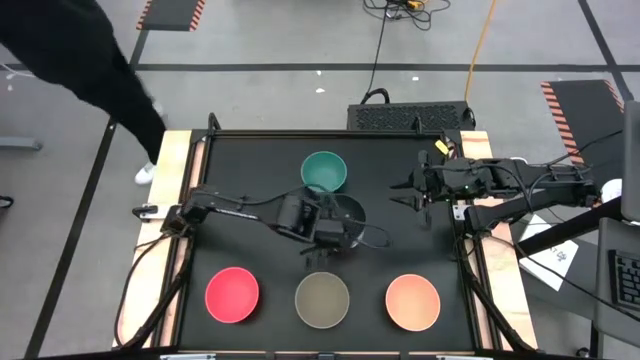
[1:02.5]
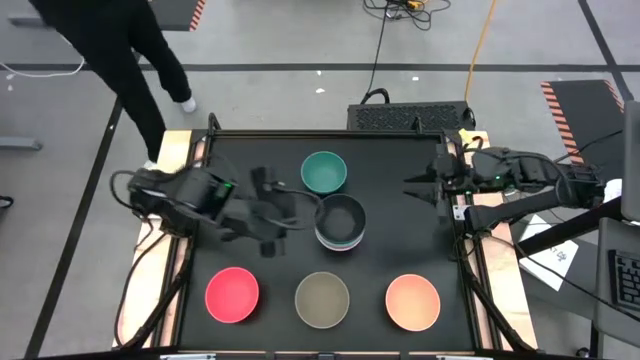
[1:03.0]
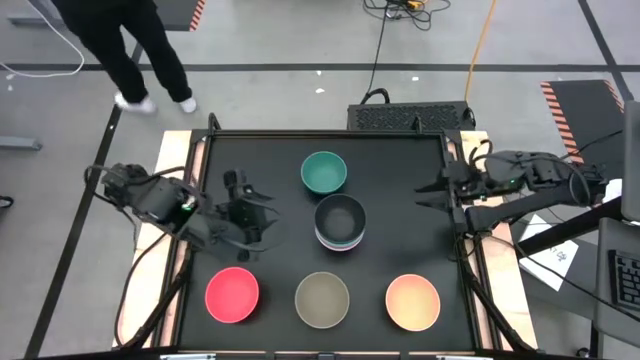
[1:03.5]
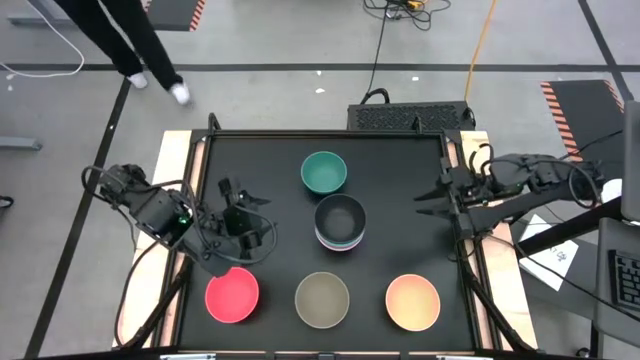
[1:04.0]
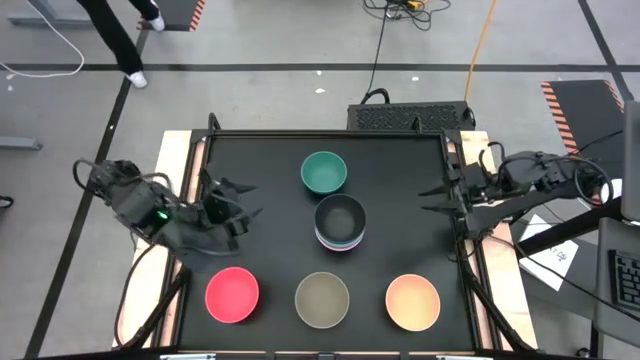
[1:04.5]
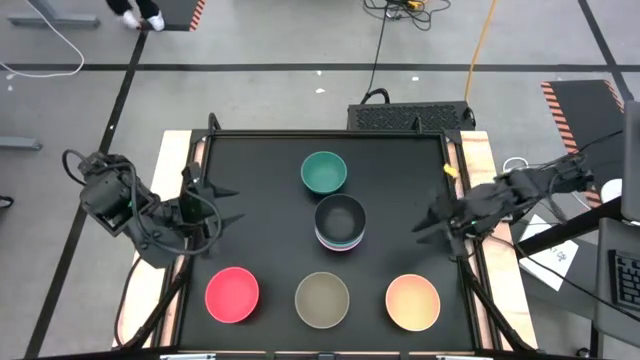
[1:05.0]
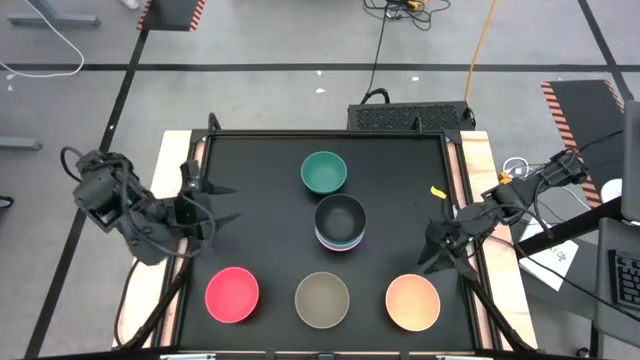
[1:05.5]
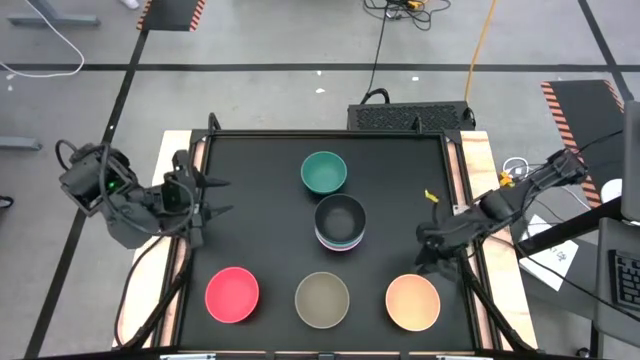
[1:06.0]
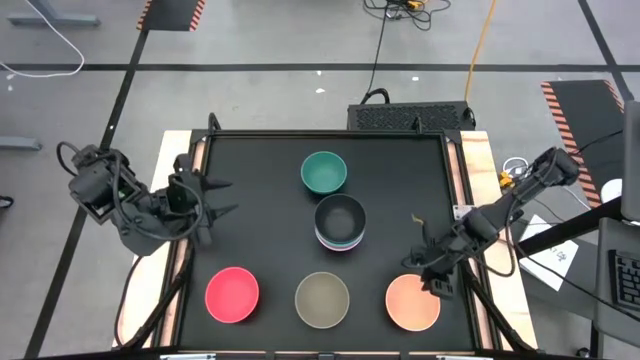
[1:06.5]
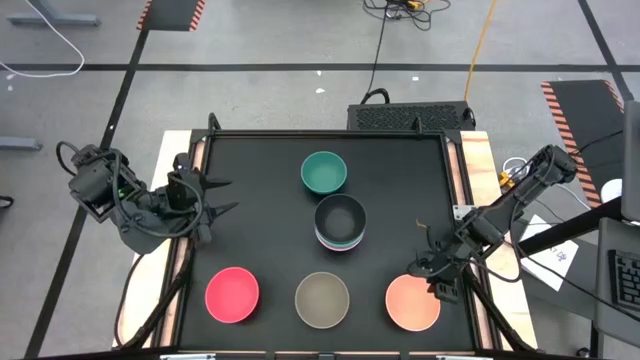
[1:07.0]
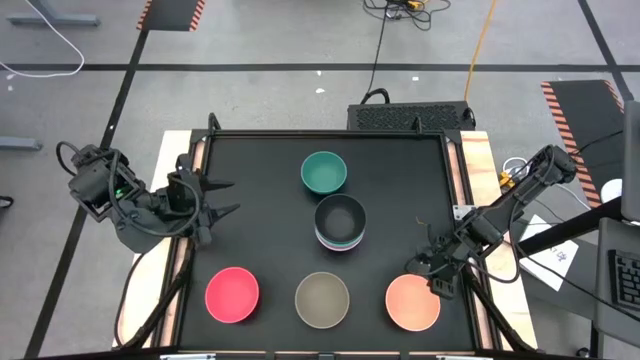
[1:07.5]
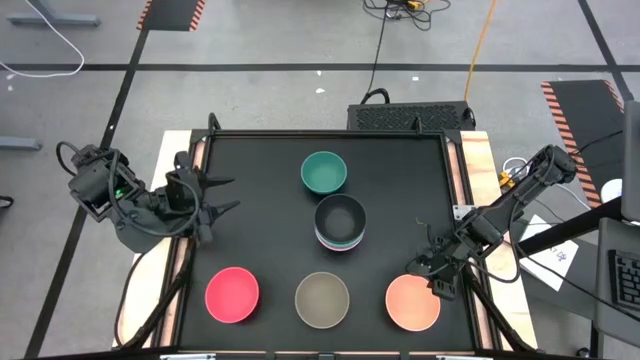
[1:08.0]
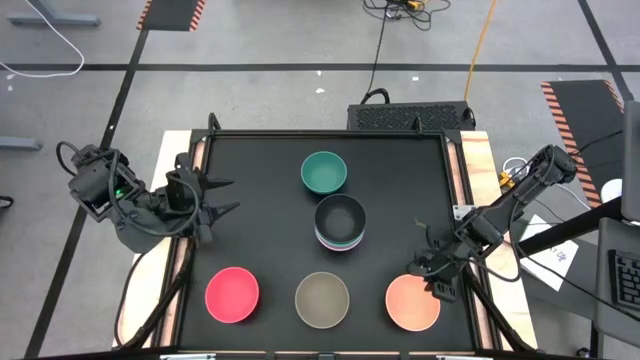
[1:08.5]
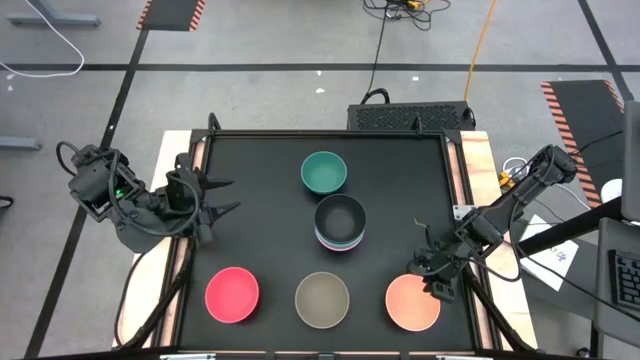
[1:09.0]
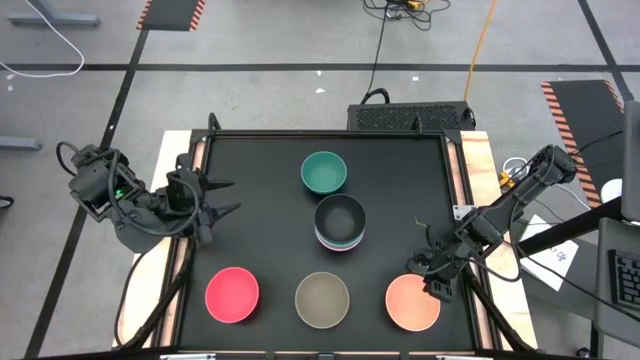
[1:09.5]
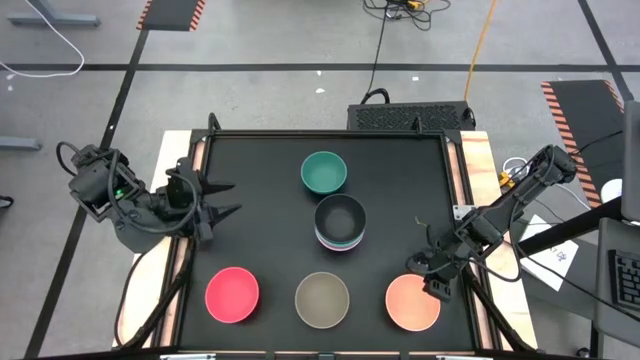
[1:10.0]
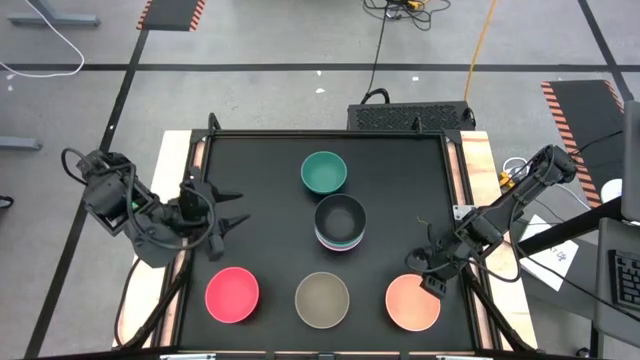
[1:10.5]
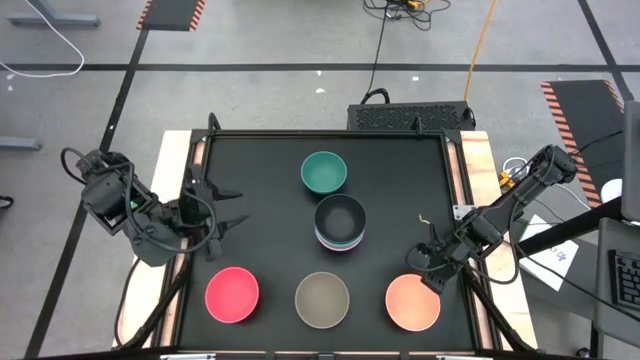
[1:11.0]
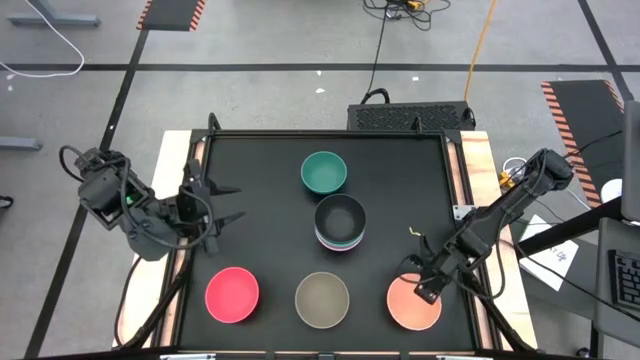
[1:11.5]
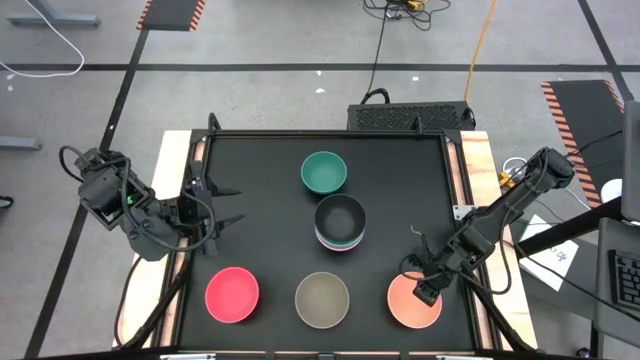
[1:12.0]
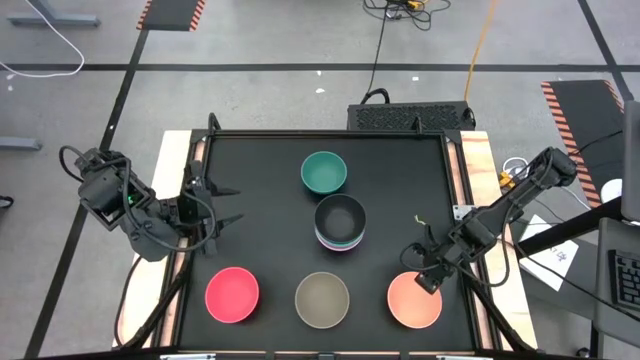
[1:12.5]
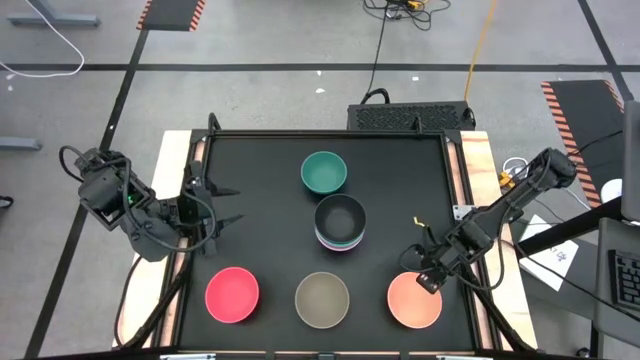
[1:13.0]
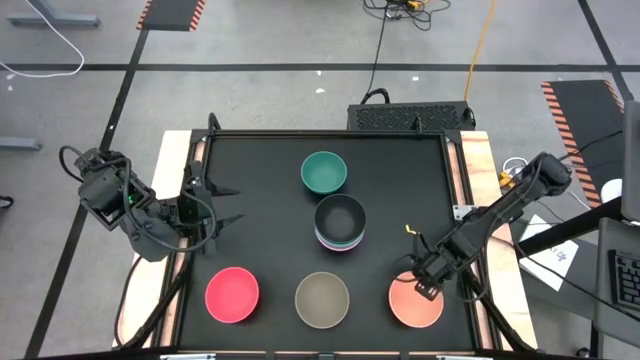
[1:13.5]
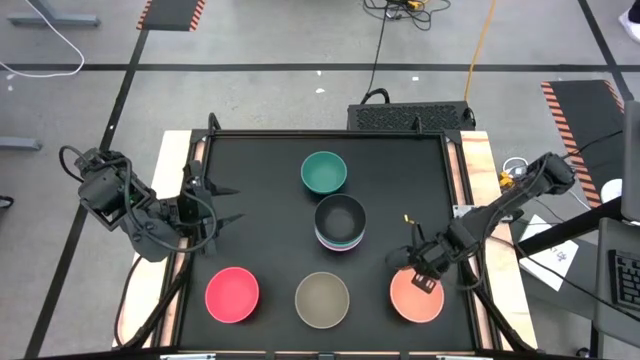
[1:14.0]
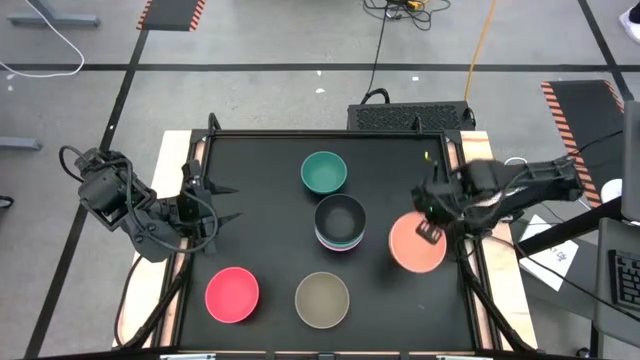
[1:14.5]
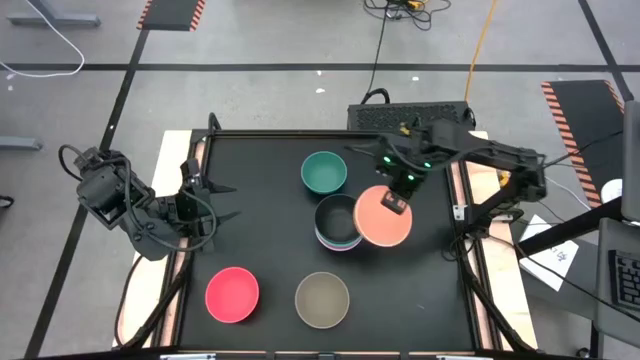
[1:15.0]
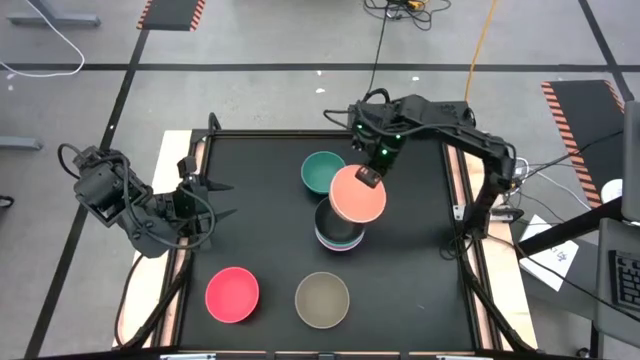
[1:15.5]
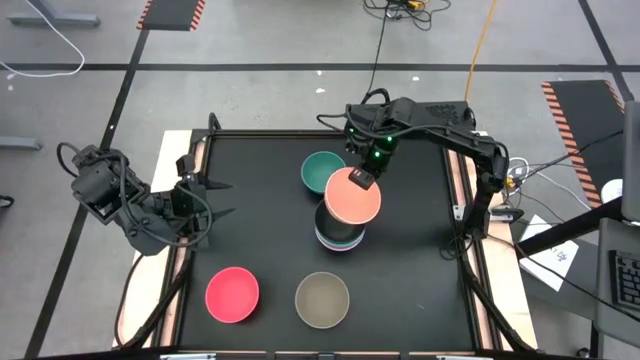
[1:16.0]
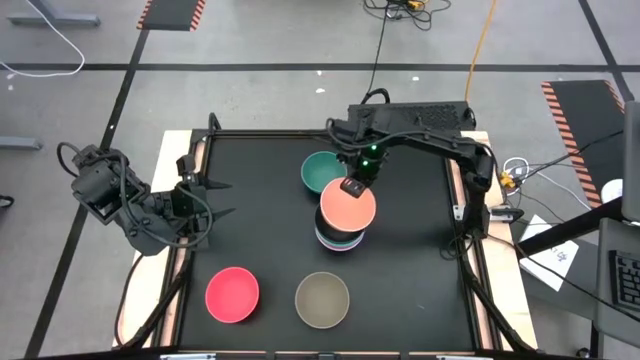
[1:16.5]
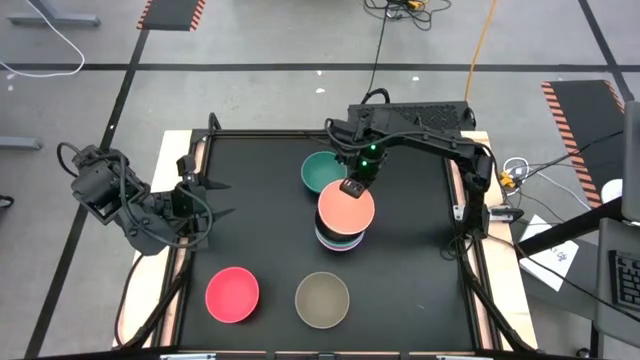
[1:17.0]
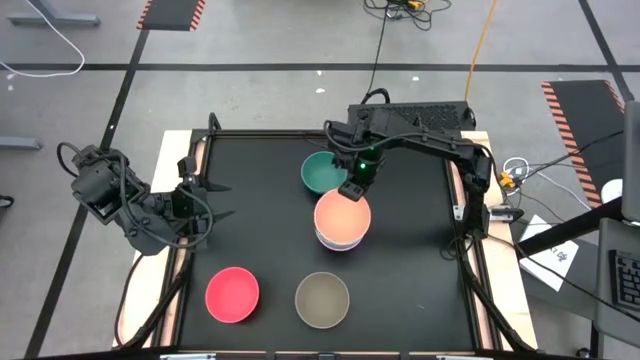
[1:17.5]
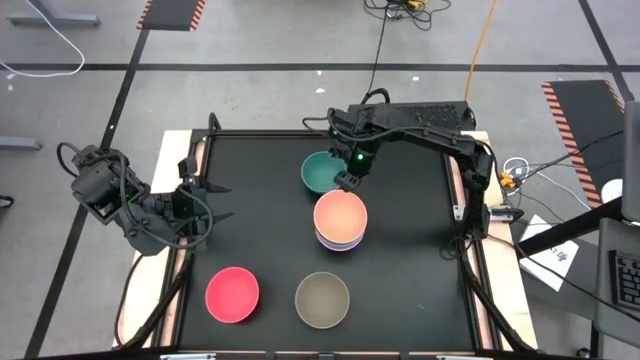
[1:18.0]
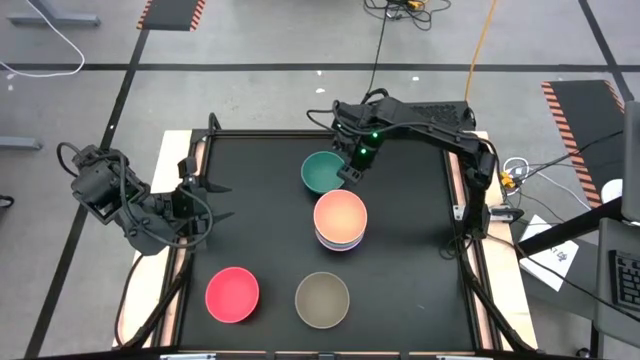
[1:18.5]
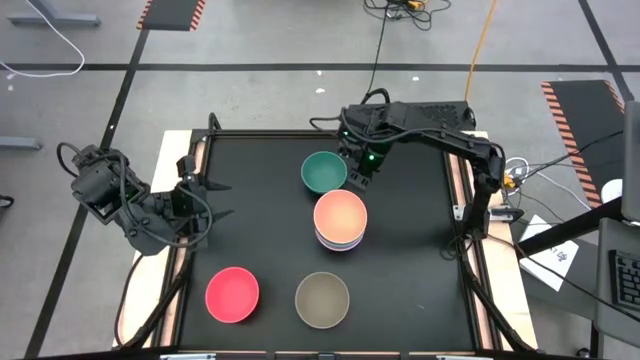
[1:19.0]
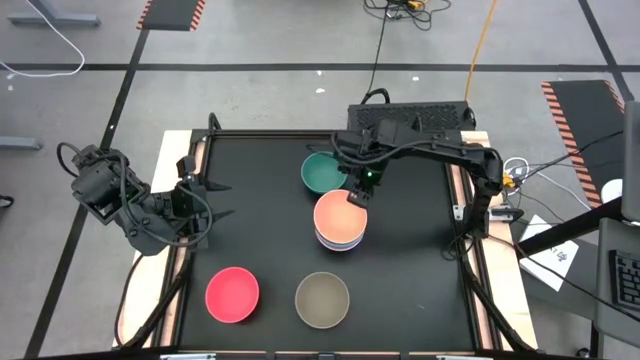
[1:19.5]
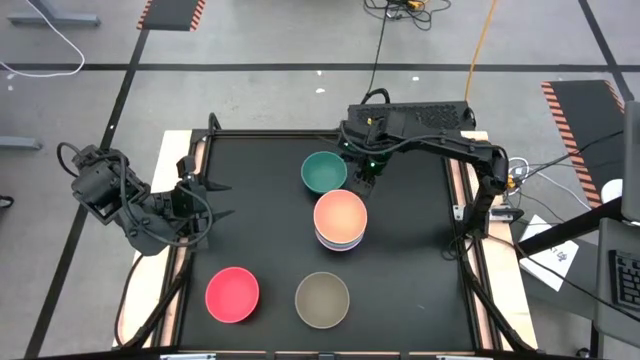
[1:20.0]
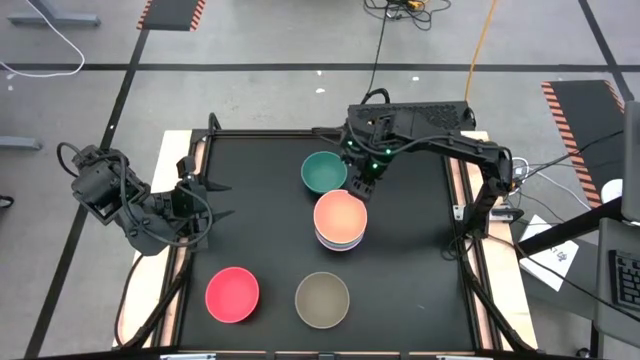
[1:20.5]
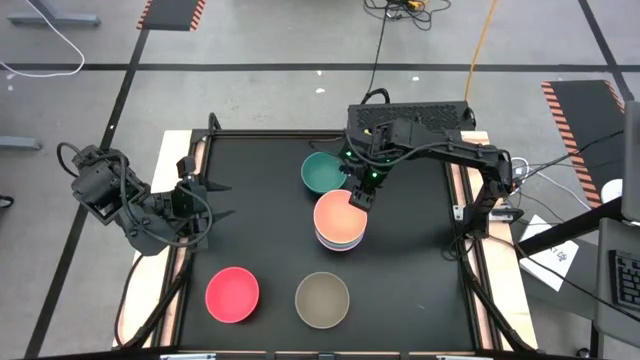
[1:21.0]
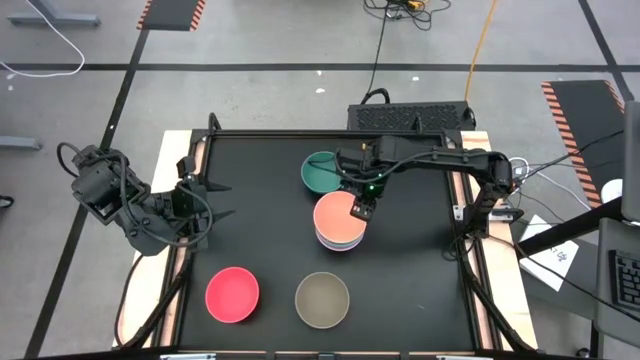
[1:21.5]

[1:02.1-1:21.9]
Task: Nest bowls inside each other
Stack the light orange bowl on top of the black bowl
